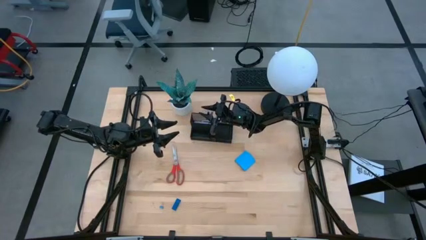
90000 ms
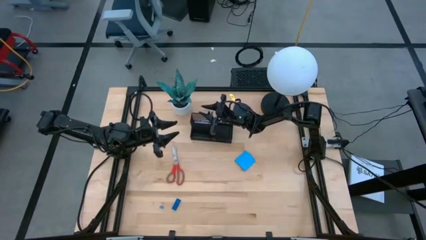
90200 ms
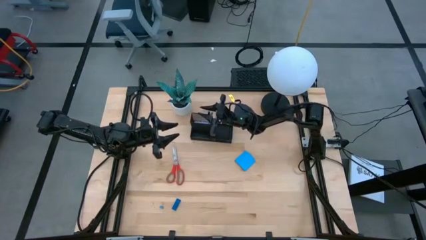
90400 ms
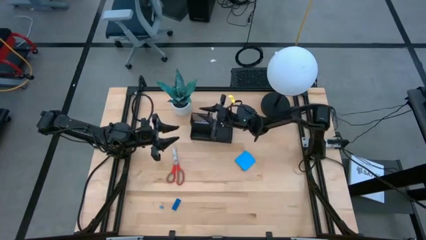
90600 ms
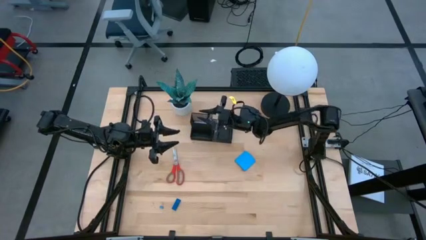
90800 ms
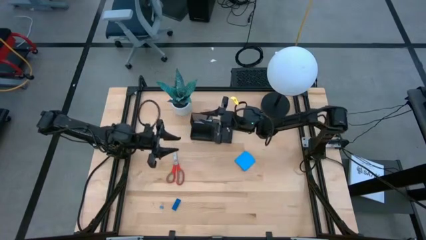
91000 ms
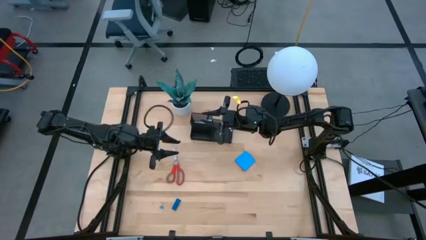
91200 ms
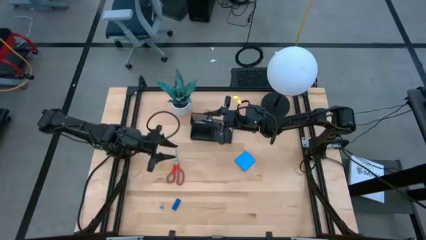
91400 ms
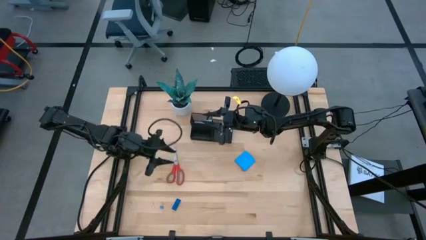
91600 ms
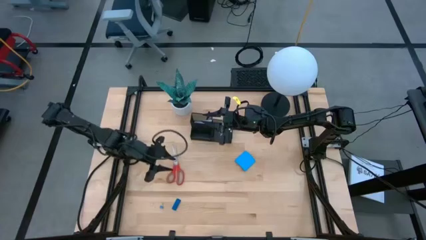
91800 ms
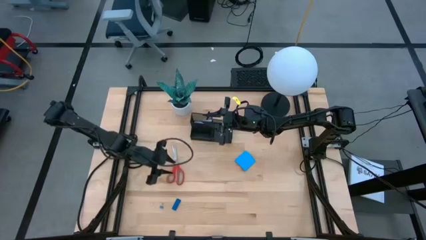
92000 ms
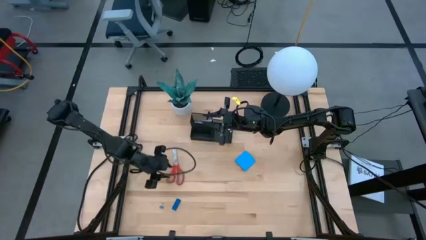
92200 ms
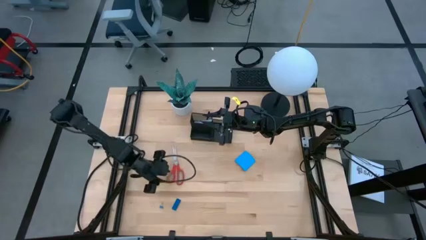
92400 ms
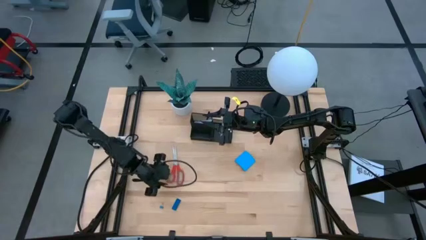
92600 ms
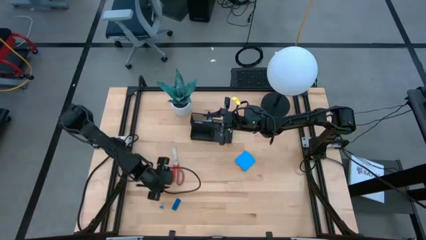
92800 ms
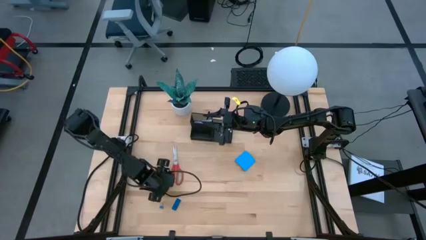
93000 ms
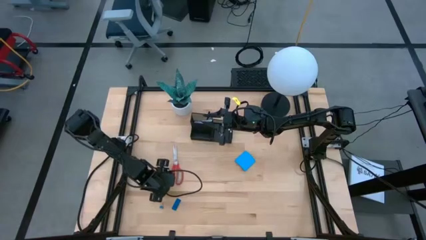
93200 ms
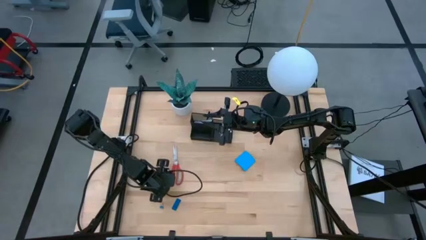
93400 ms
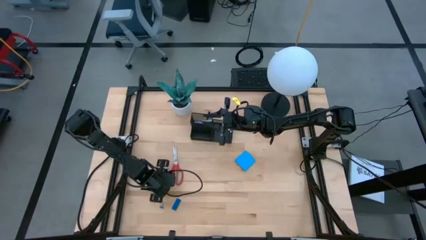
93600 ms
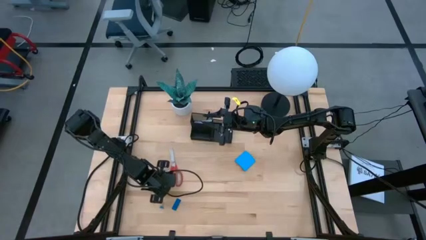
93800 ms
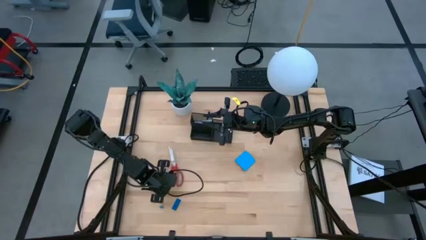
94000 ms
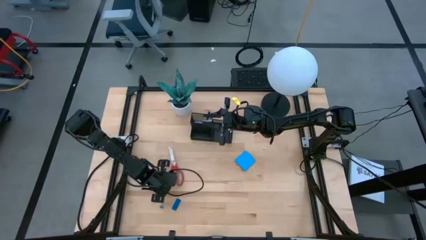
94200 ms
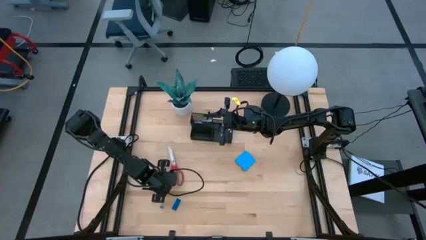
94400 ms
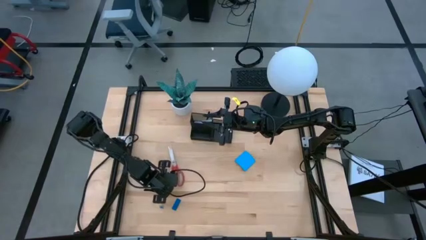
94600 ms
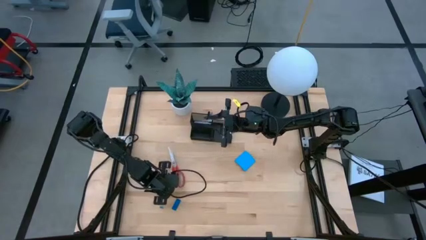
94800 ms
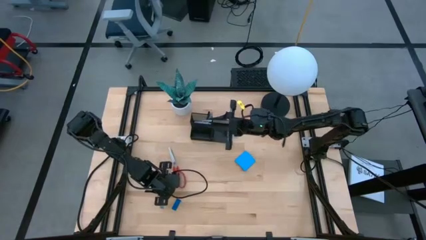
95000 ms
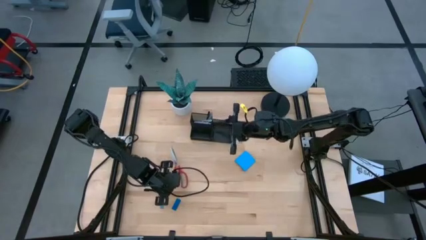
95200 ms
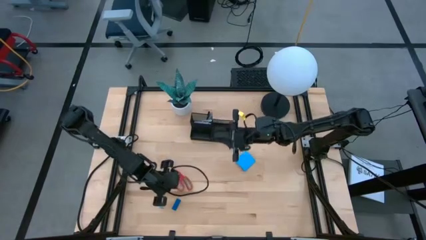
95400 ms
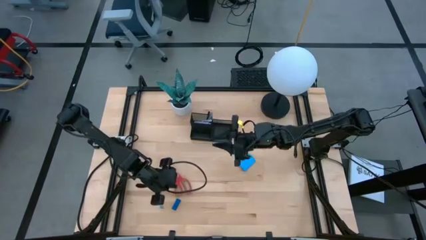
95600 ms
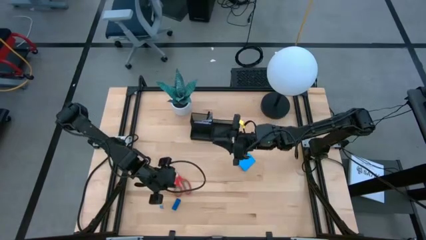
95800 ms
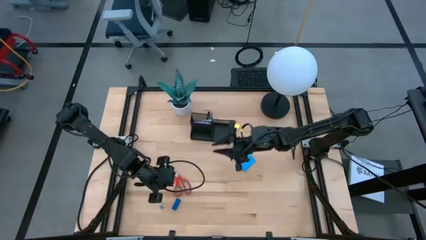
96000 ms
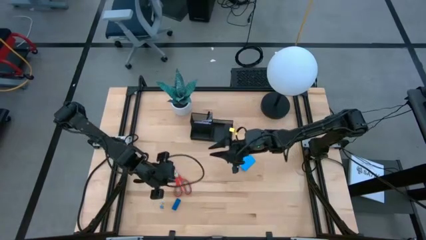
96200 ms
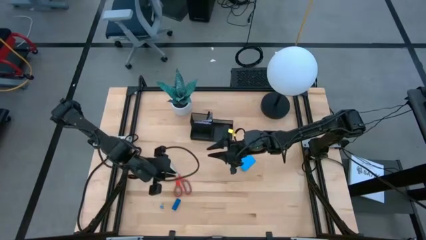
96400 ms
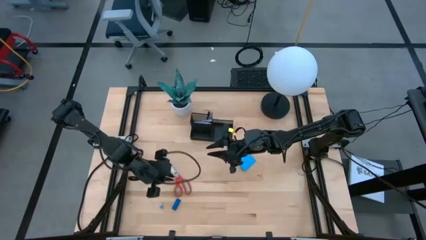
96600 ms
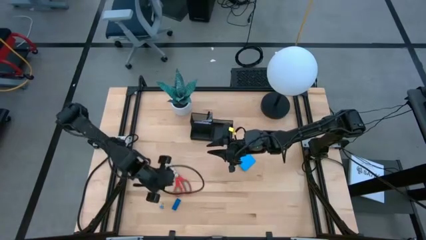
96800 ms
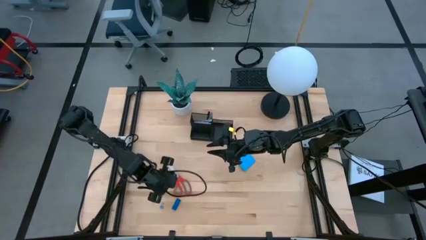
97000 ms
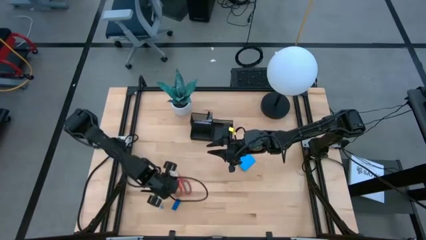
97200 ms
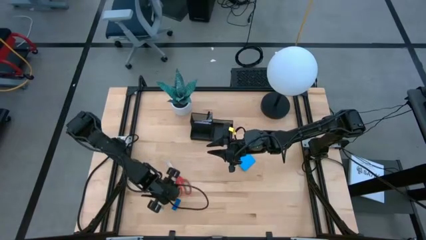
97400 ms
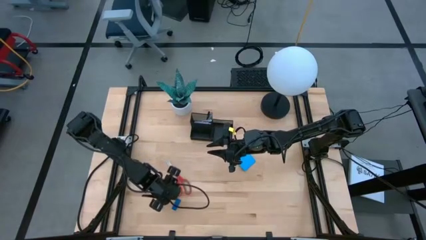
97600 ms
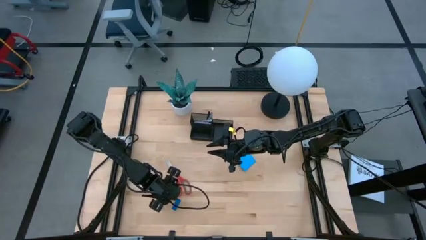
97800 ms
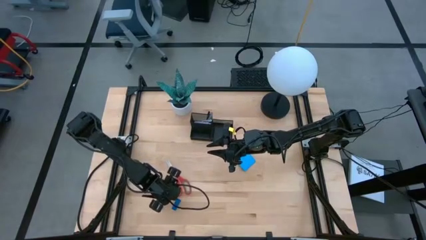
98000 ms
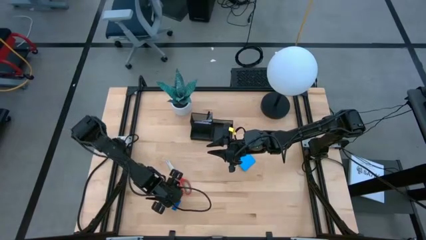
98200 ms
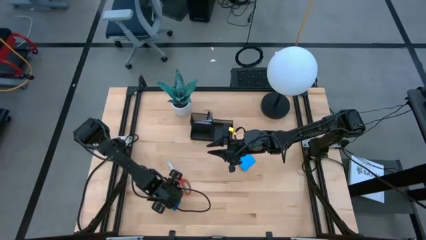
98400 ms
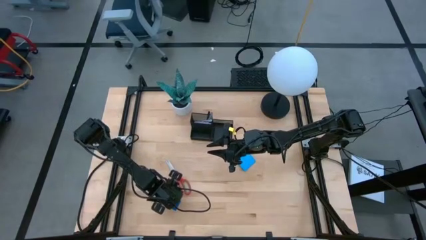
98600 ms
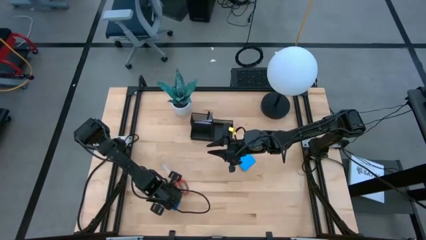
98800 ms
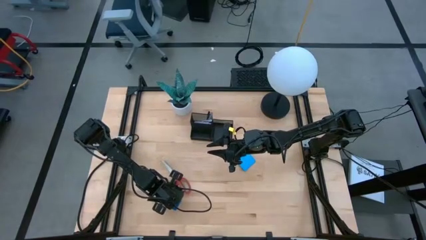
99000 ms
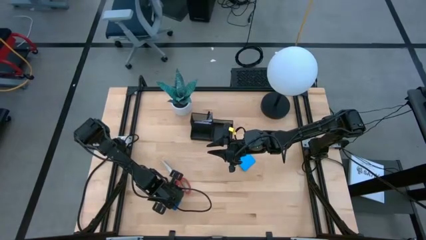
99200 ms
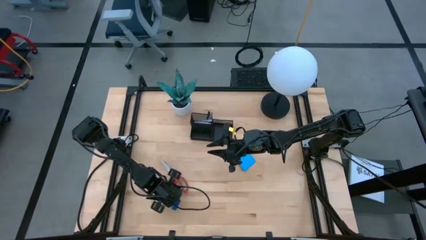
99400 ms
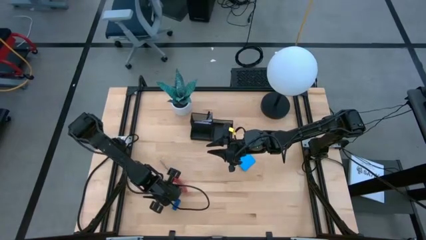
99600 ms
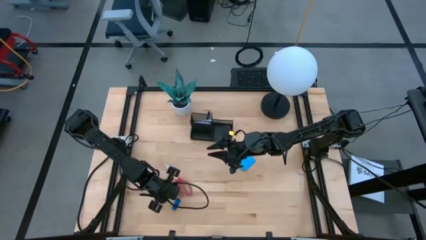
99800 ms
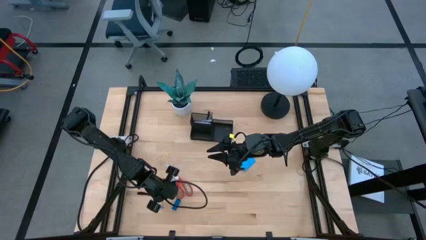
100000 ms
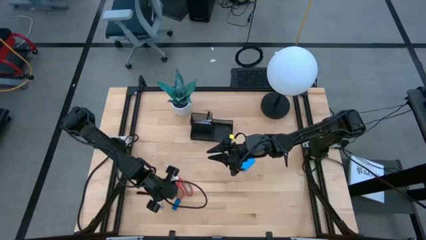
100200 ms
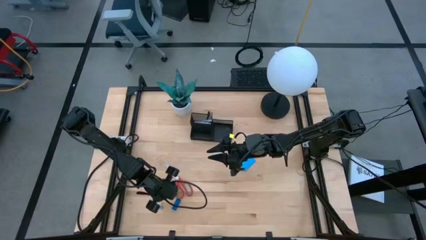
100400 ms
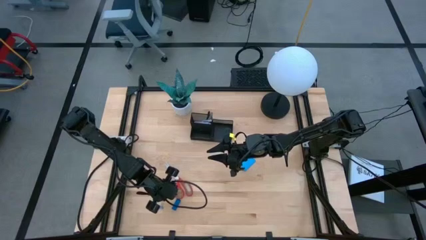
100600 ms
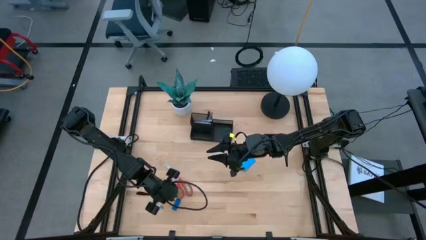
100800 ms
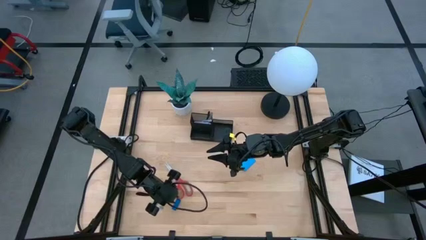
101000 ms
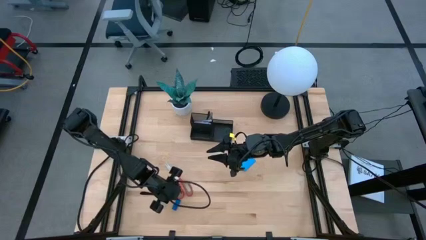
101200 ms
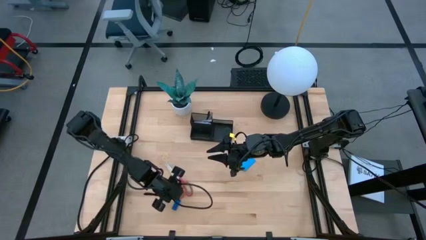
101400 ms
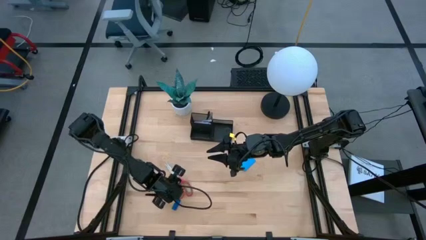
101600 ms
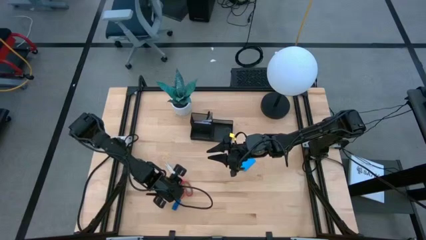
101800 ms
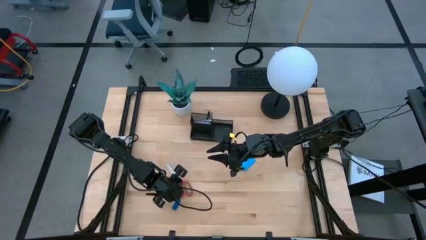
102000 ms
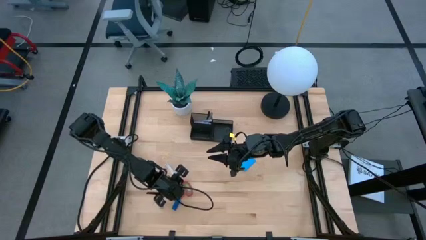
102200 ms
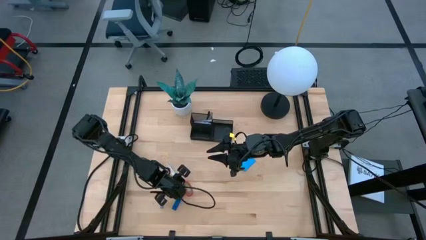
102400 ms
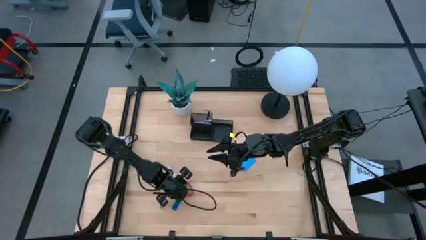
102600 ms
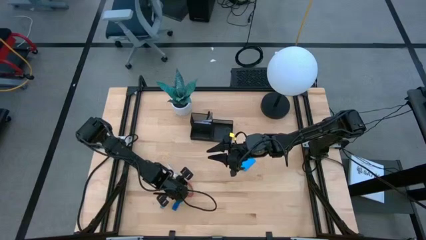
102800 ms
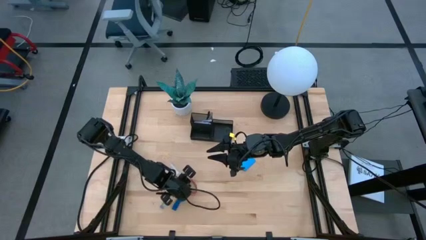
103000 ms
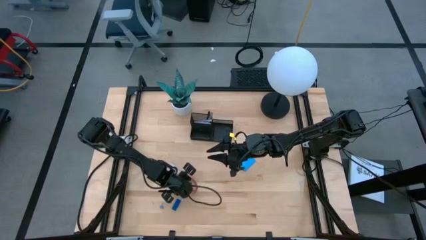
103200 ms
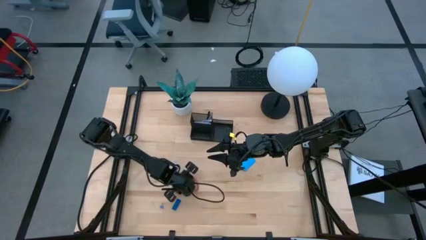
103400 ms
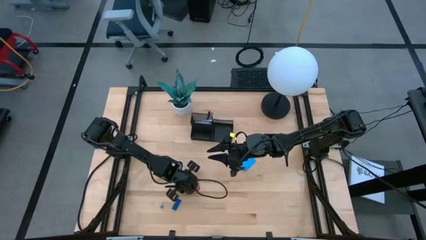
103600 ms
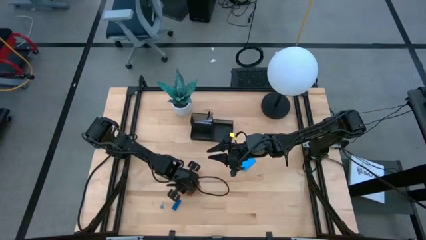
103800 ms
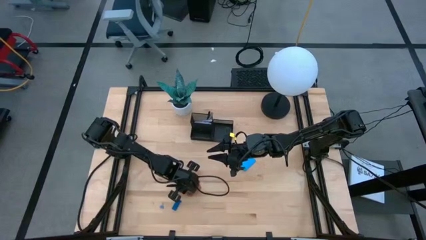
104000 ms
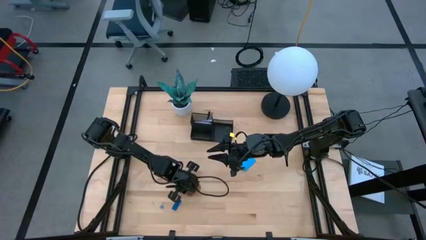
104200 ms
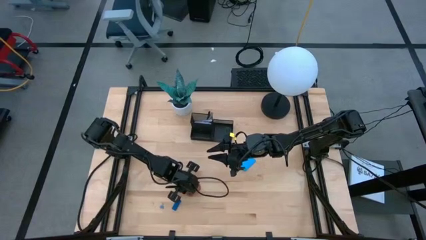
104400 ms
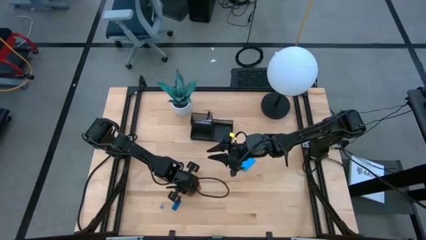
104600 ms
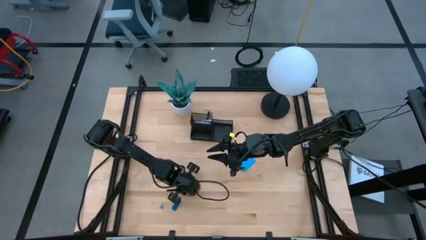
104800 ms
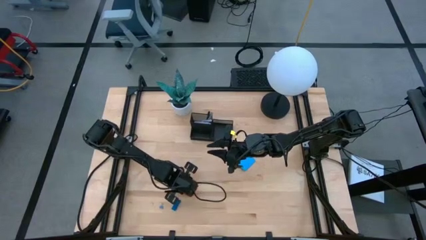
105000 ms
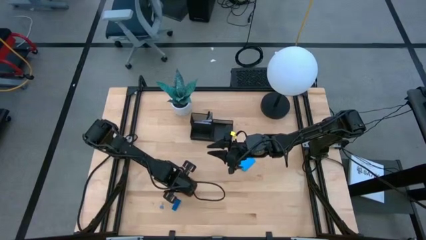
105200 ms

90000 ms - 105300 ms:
Task: Pick and place office supplies into organizer
Put the red scissor into the black desk organizer

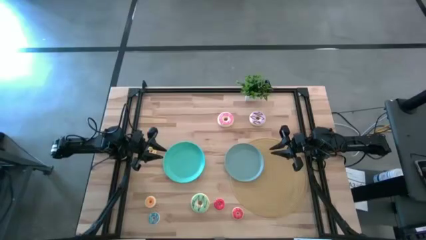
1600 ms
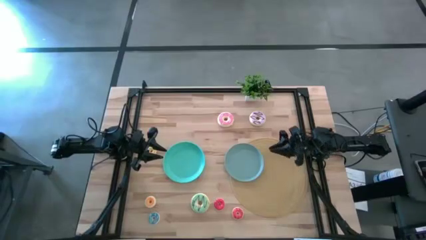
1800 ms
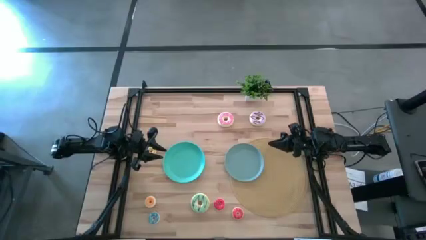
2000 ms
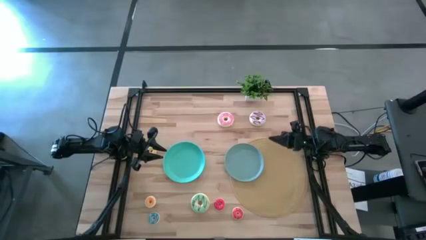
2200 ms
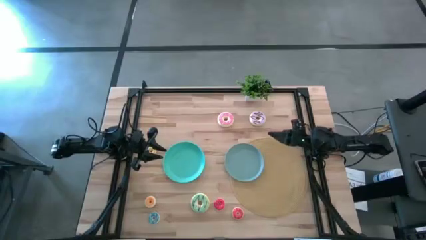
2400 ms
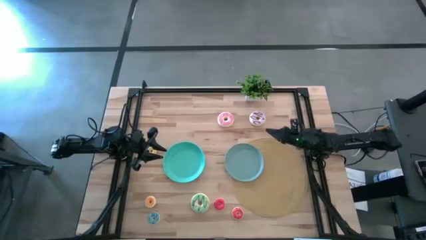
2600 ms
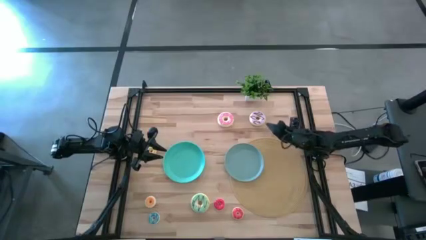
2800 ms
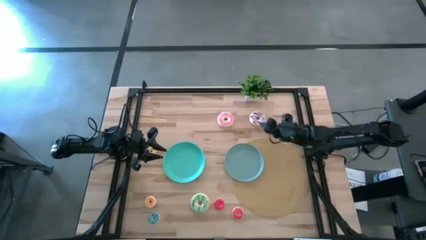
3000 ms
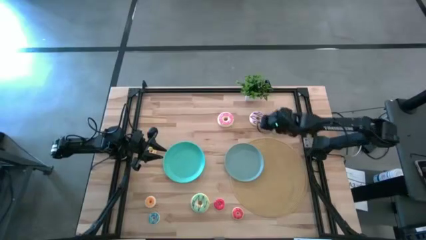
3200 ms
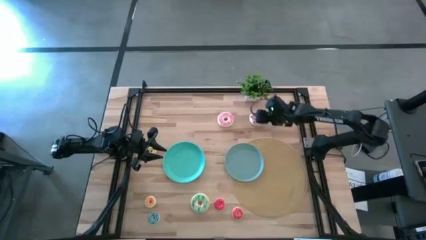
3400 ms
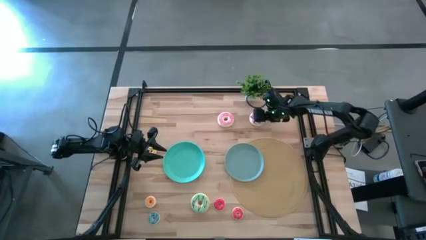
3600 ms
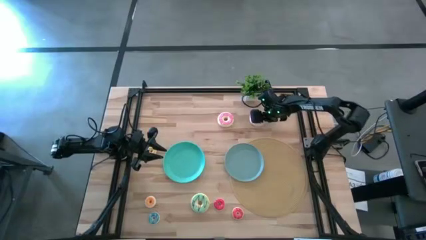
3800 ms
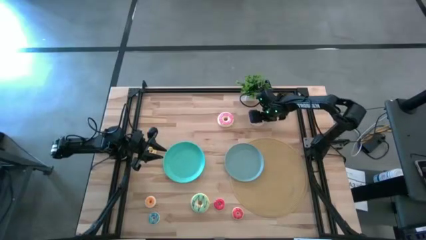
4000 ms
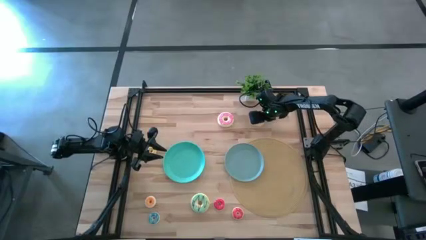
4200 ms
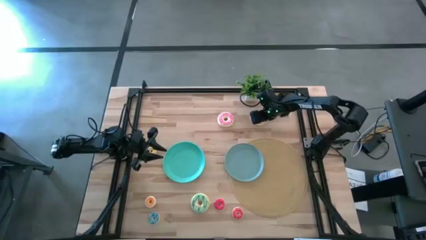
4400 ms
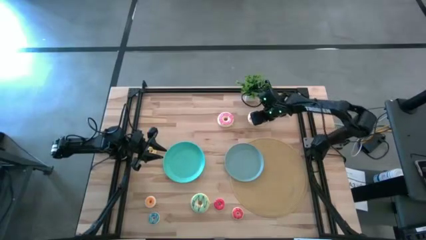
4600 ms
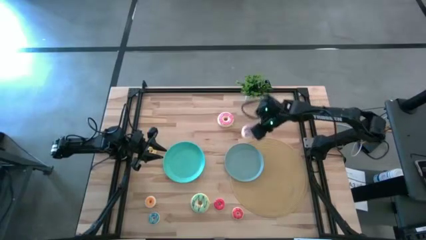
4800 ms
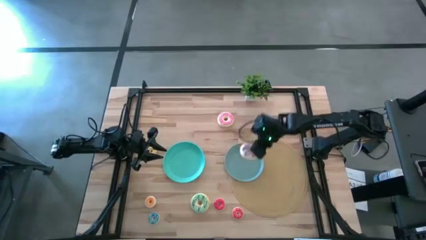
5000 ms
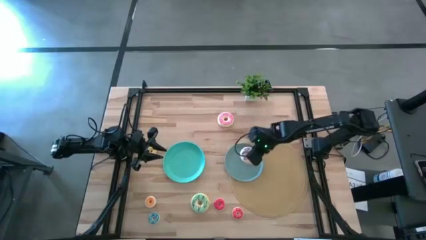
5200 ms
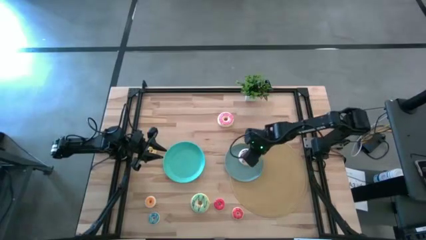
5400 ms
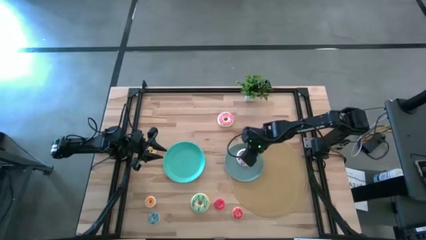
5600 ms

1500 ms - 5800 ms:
Task: Pick & Place donuts
Put the large purple donut on the blue plate
